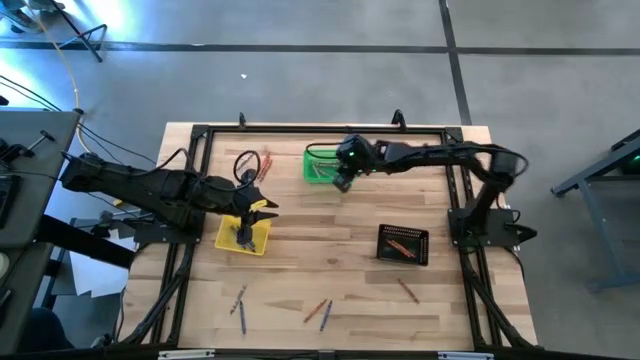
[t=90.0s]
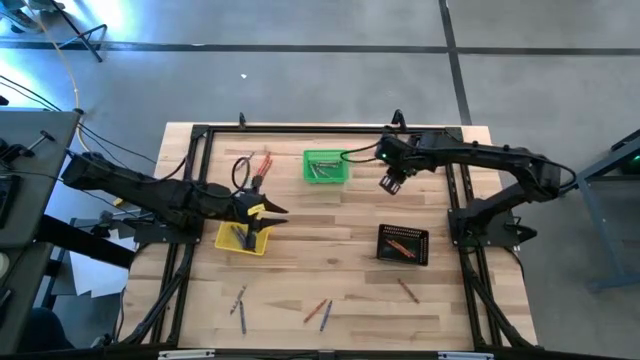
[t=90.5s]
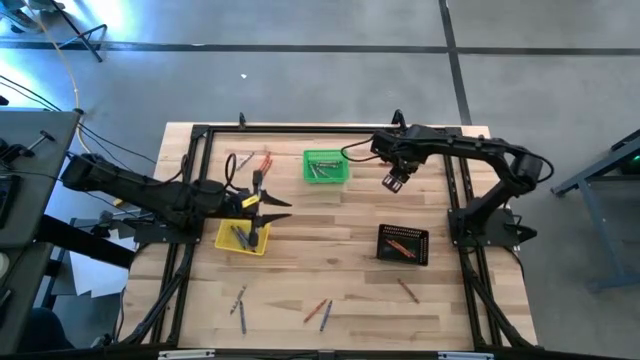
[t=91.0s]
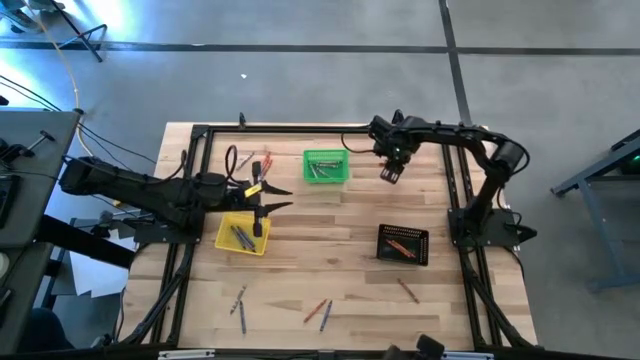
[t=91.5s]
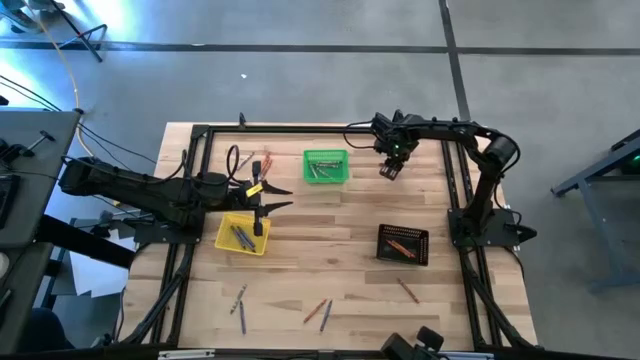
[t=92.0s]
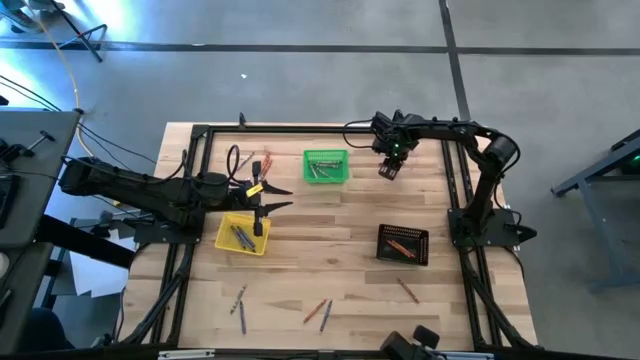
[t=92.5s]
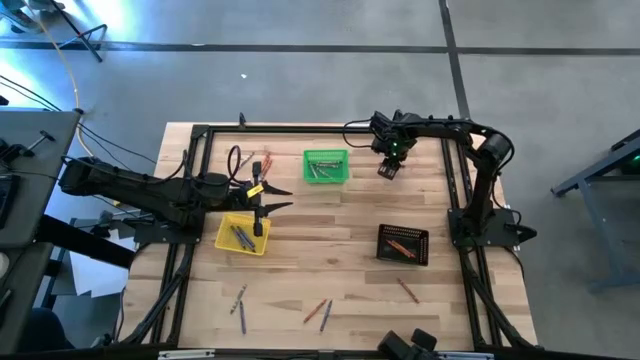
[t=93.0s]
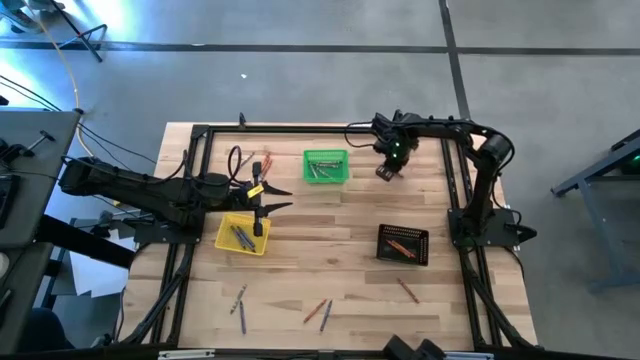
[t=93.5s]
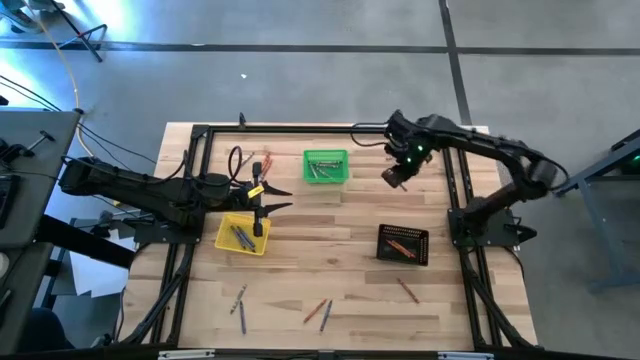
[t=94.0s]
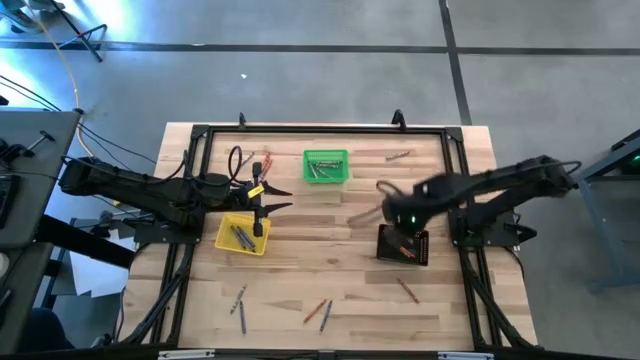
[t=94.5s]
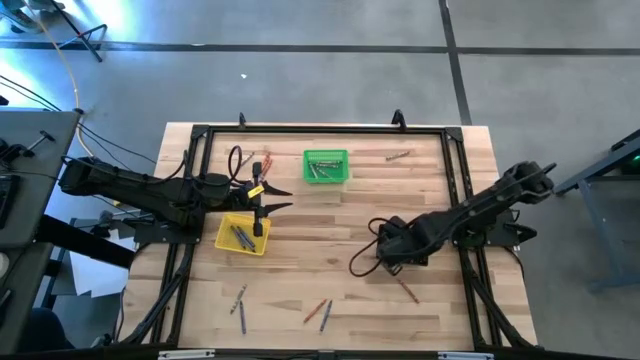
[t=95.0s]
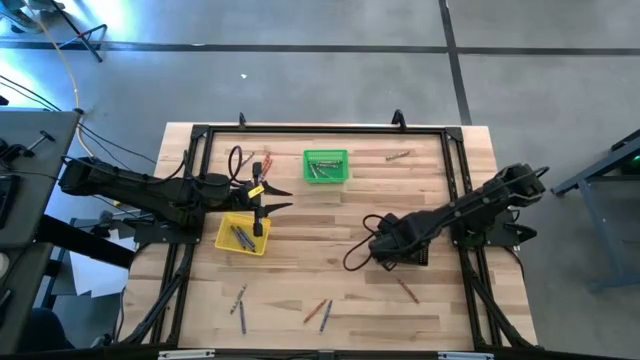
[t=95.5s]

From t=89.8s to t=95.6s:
Task: Sort crayons
Put the orange crayon into the black basket

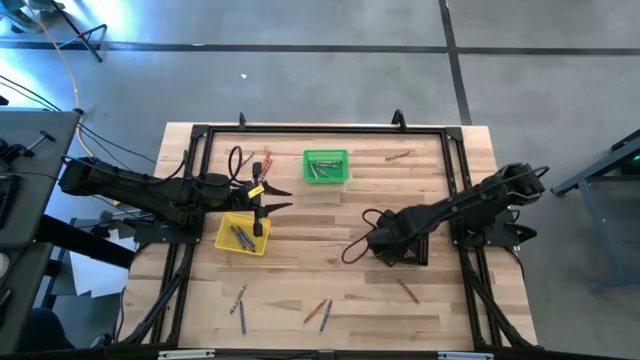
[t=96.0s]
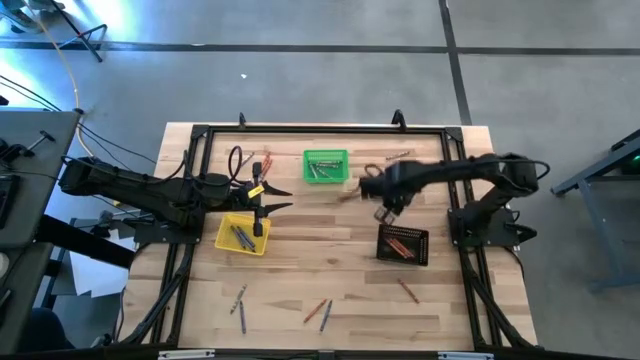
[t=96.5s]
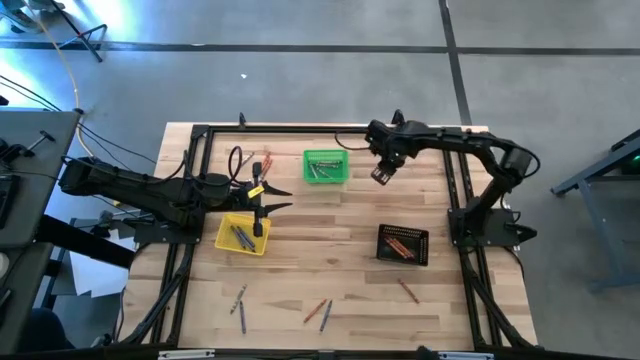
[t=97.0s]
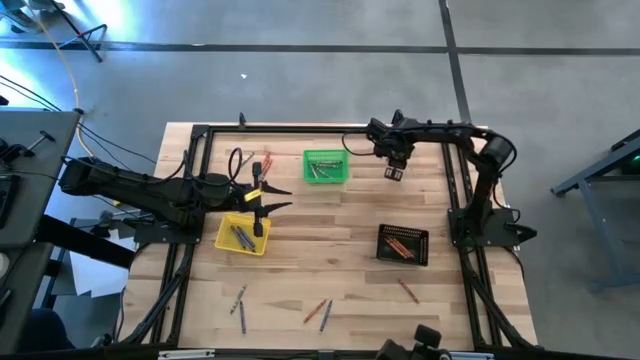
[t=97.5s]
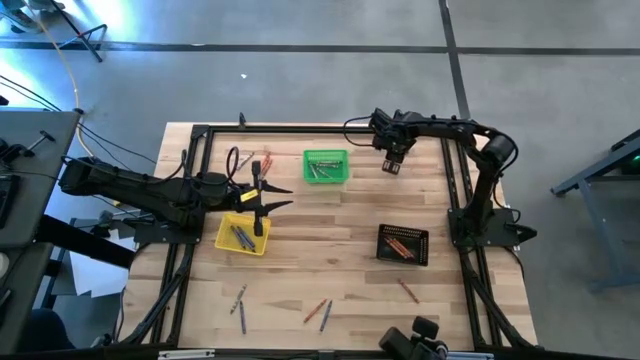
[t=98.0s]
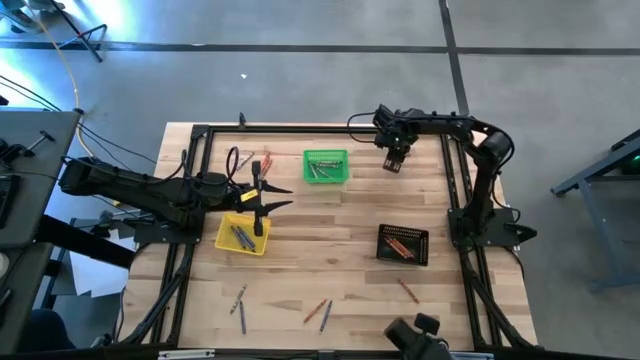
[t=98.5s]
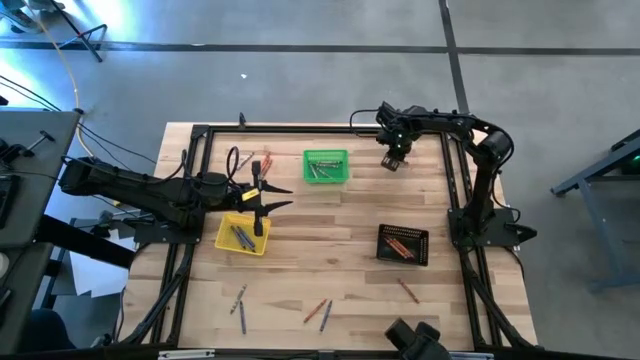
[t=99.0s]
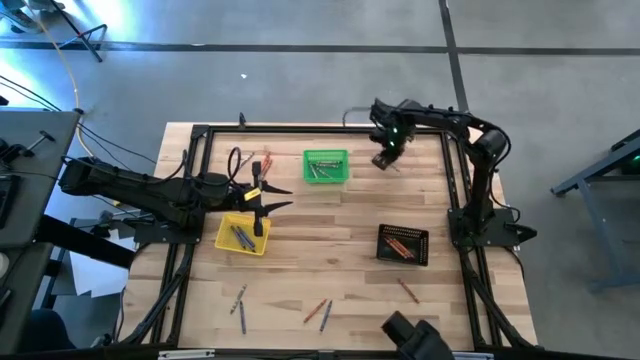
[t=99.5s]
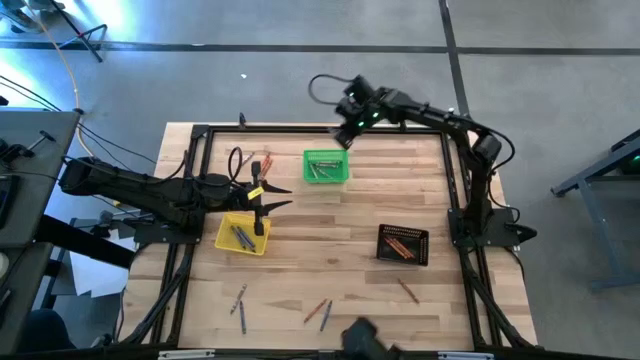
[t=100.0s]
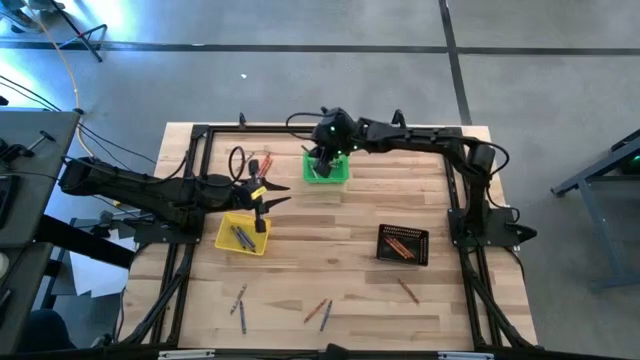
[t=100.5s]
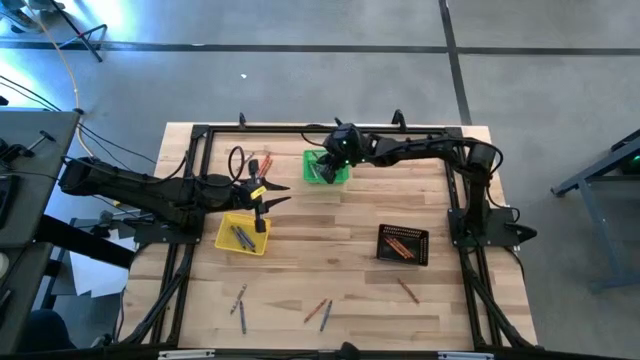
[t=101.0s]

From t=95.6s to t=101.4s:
Put the gray crayon into the green basket

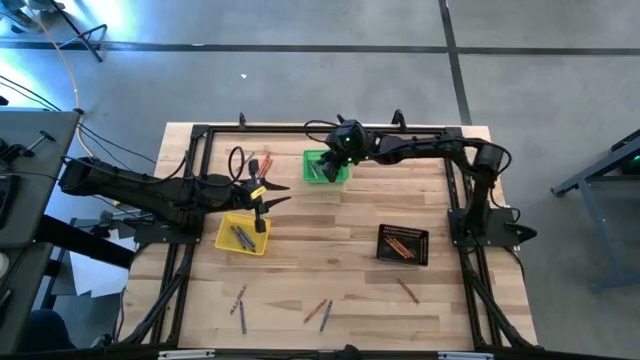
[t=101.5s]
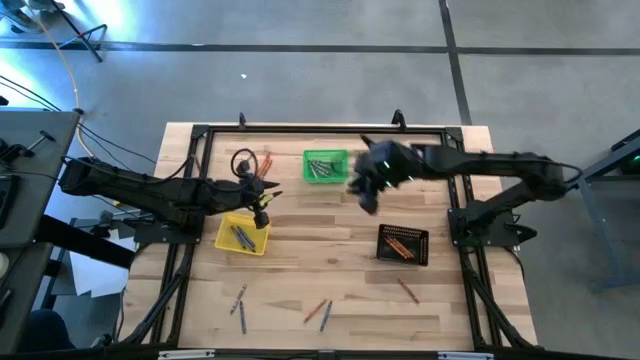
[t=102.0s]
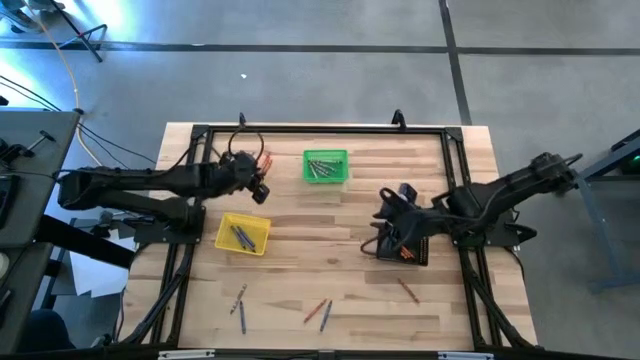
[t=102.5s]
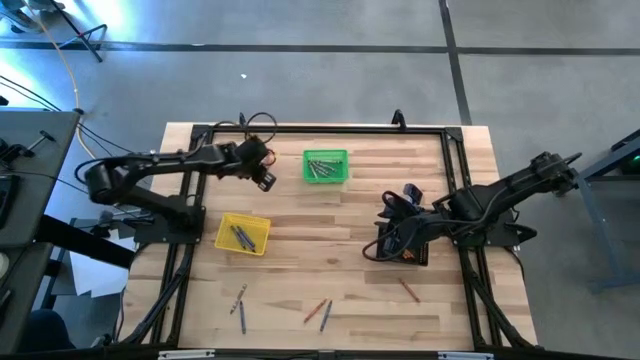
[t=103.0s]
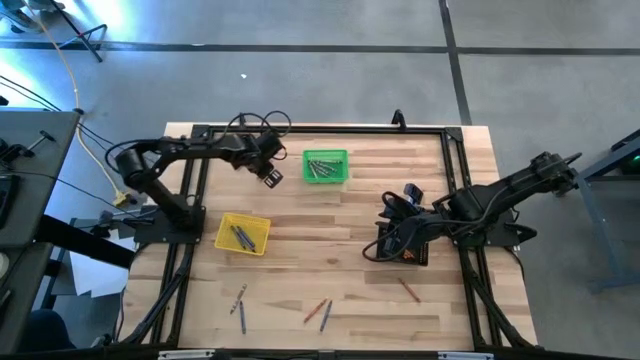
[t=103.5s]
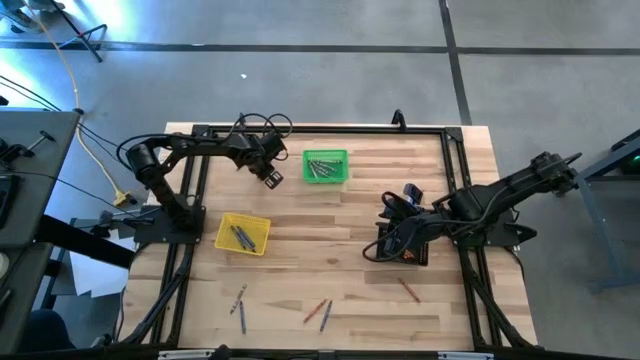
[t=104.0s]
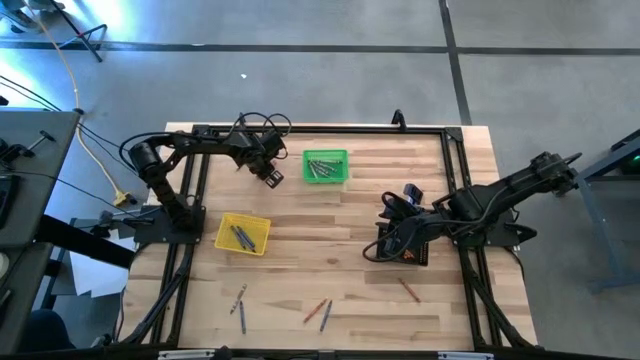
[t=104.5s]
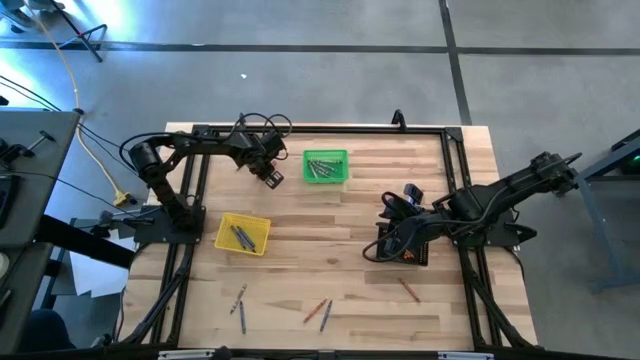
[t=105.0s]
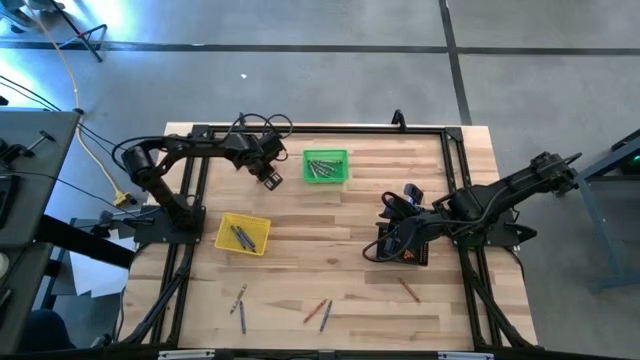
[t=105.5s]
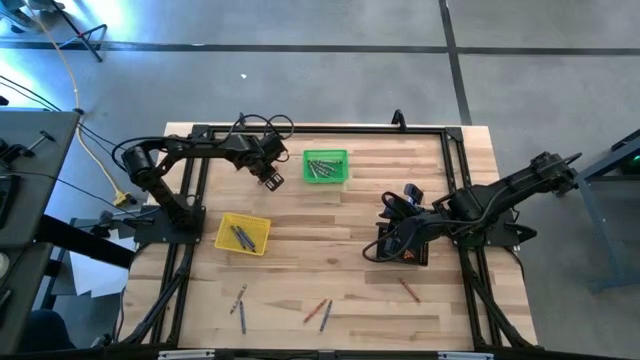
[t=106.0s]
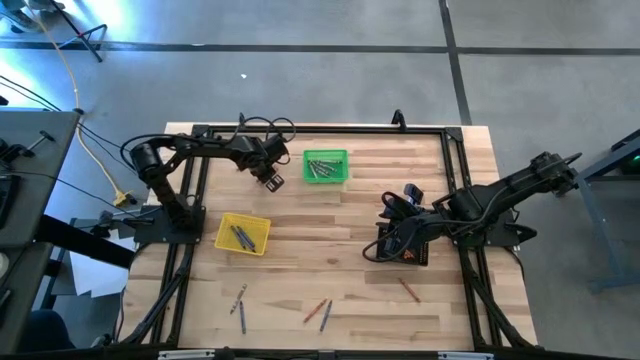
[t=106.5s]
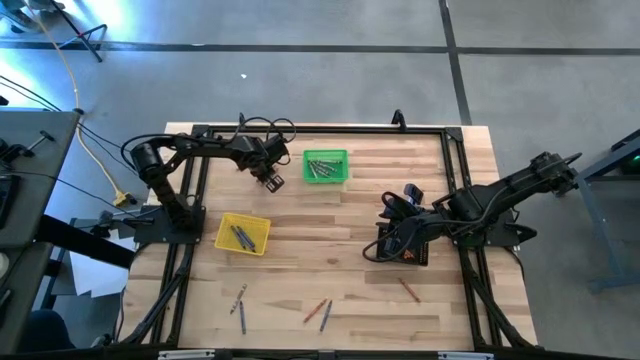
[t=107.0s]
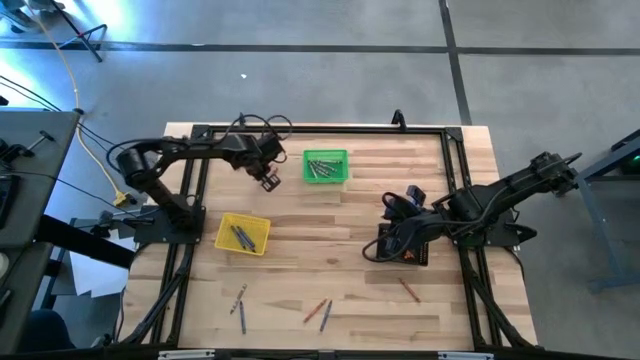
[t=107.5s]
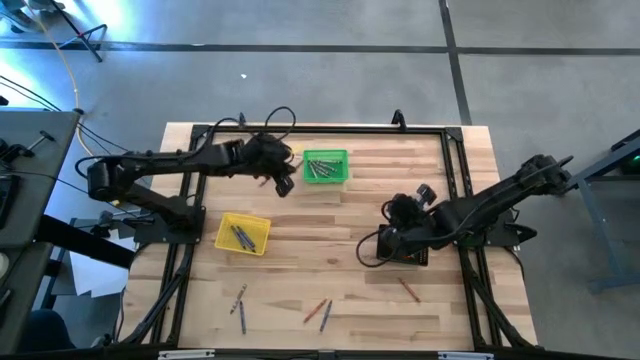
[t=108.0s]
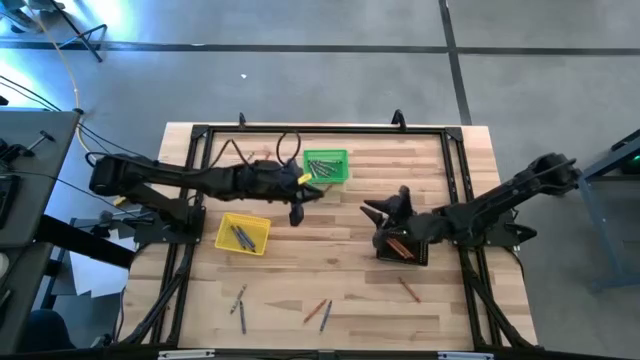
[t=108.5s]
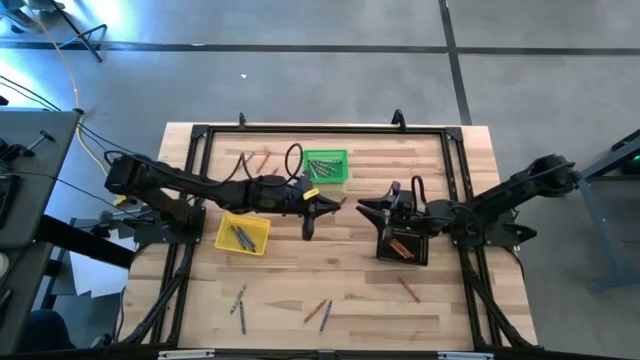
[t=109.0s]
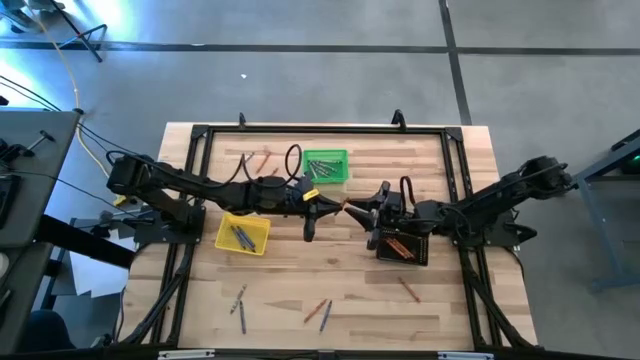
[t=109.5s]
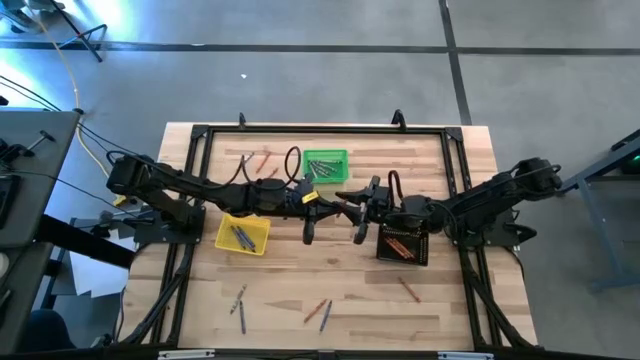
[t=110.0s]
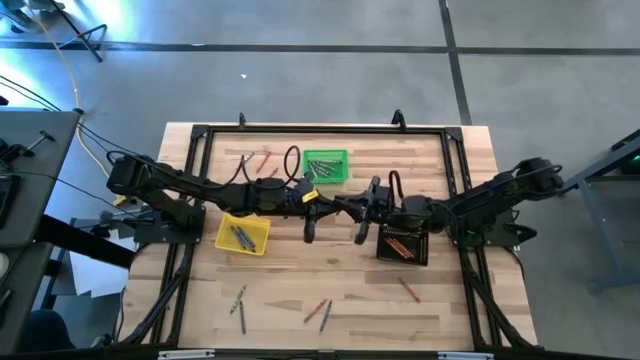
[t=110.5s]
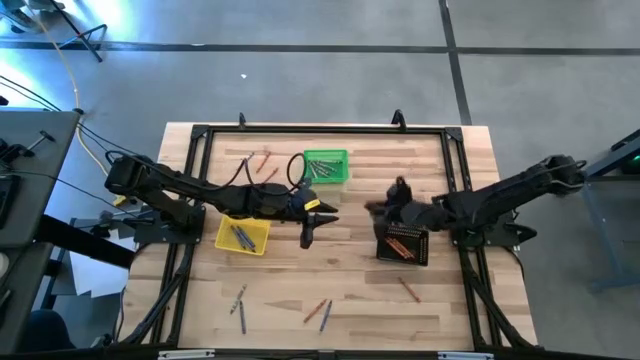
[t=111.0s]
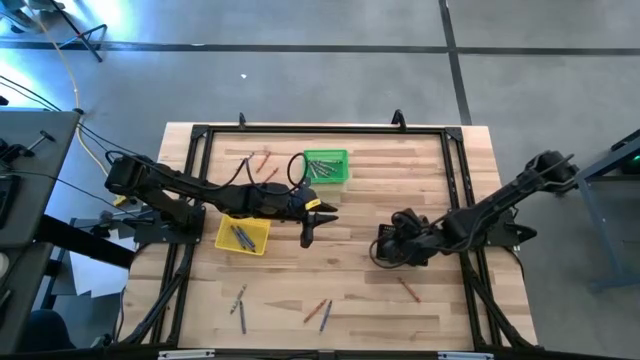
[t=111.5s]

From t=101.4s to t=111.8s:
Put the orange crayon into the black basket
